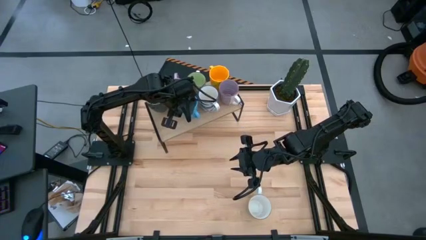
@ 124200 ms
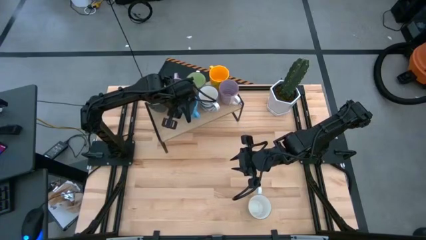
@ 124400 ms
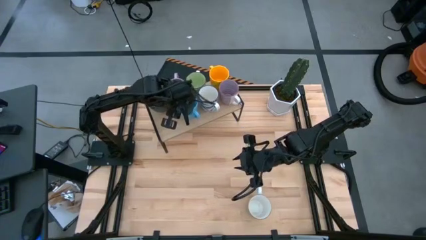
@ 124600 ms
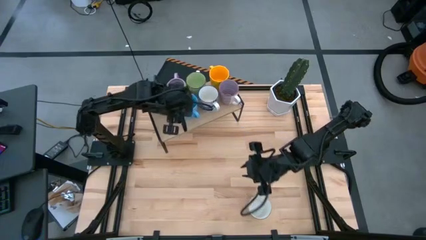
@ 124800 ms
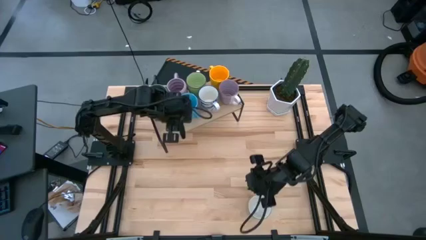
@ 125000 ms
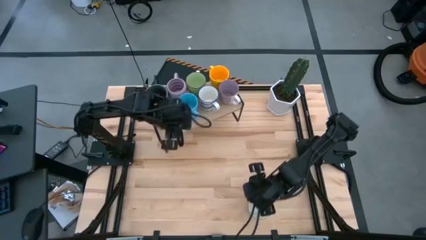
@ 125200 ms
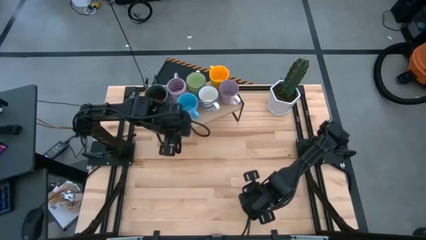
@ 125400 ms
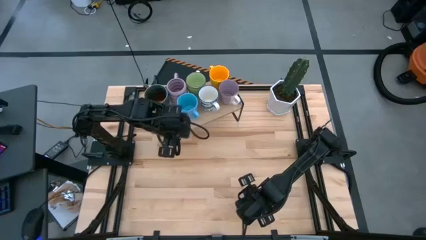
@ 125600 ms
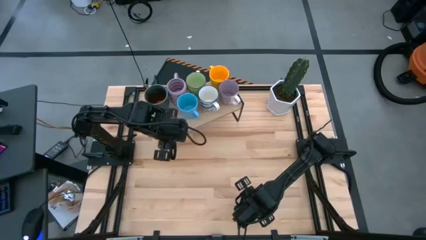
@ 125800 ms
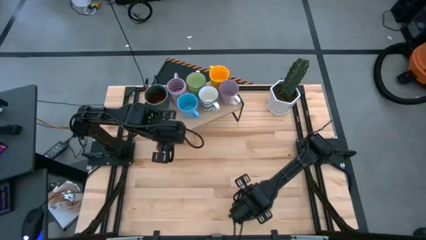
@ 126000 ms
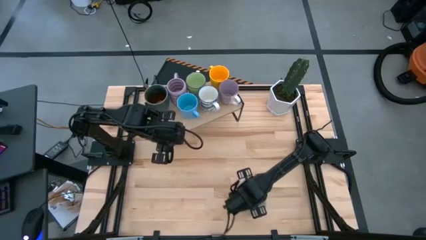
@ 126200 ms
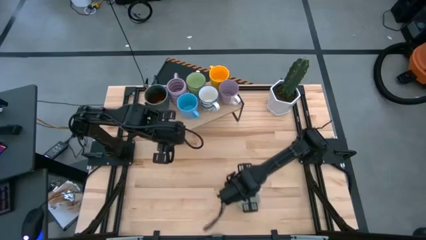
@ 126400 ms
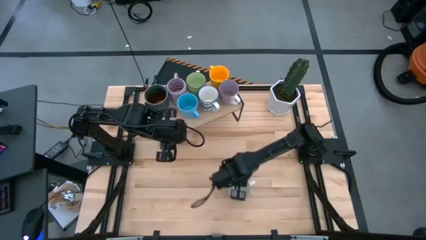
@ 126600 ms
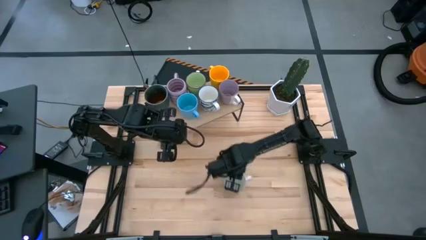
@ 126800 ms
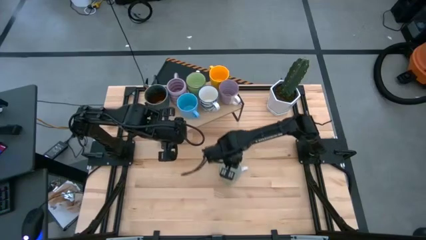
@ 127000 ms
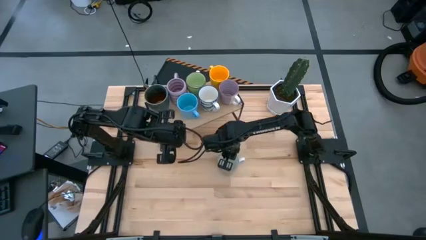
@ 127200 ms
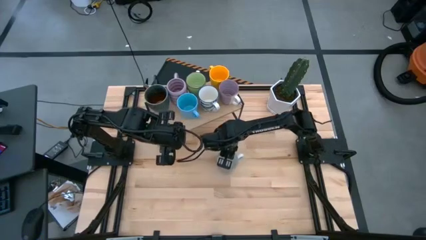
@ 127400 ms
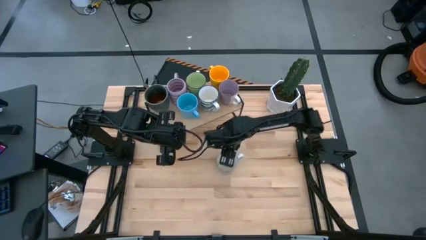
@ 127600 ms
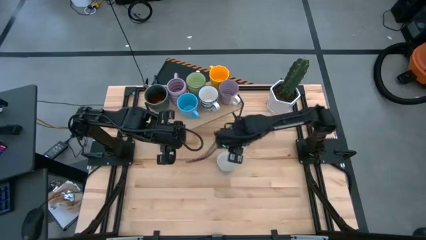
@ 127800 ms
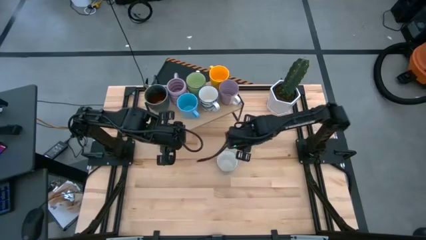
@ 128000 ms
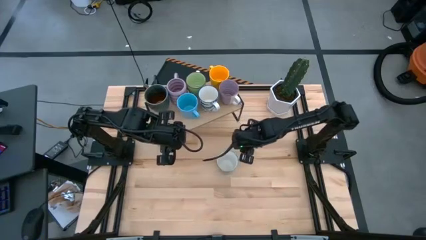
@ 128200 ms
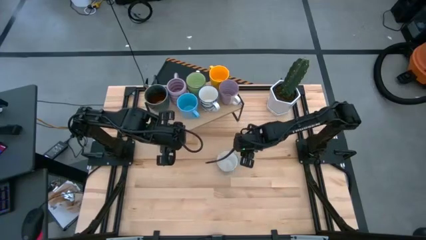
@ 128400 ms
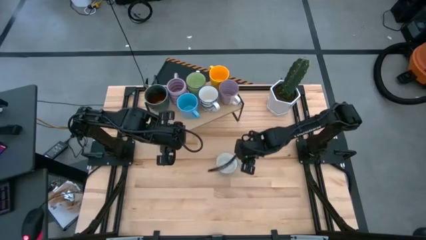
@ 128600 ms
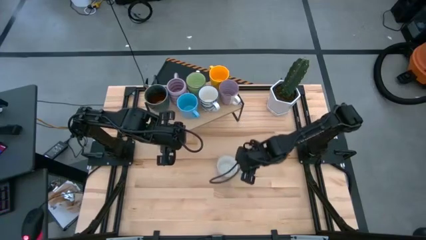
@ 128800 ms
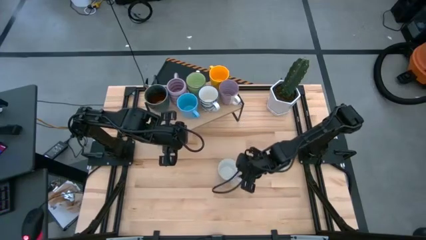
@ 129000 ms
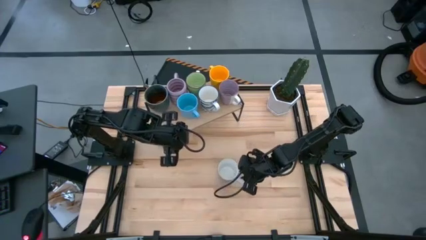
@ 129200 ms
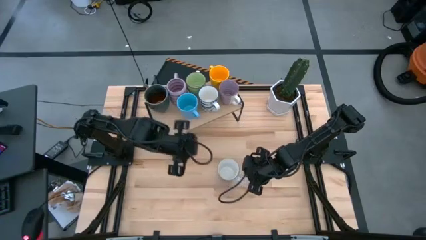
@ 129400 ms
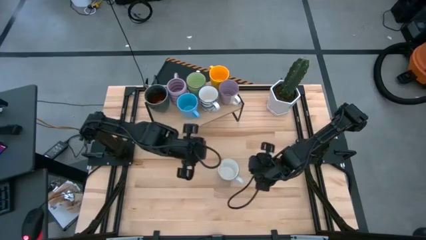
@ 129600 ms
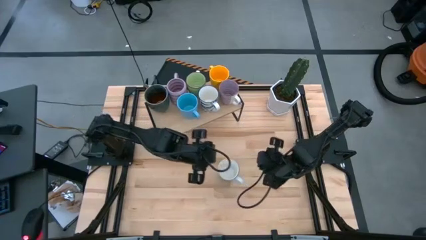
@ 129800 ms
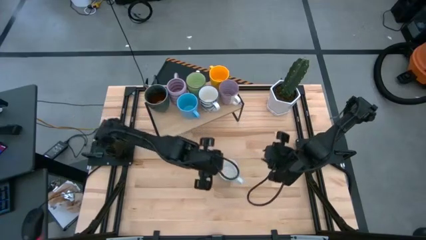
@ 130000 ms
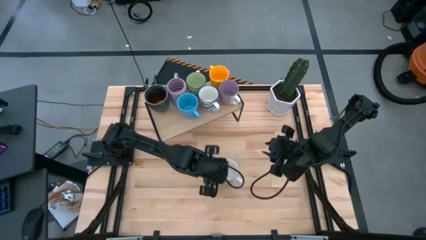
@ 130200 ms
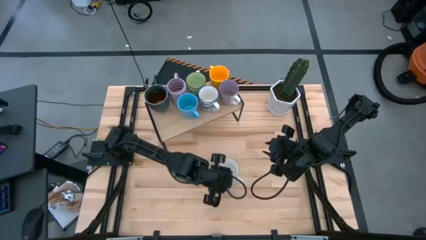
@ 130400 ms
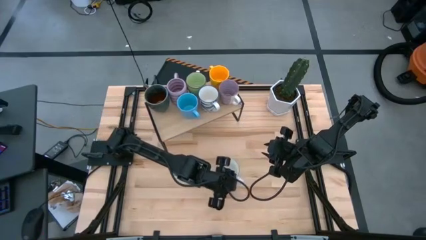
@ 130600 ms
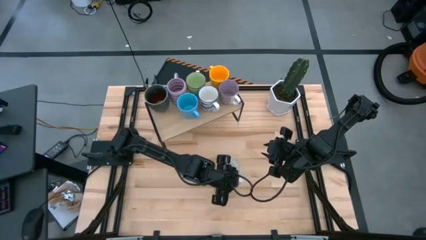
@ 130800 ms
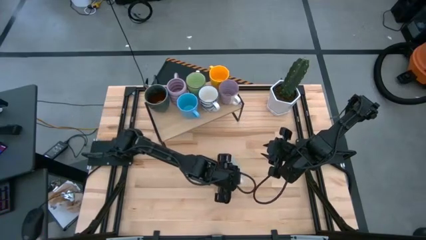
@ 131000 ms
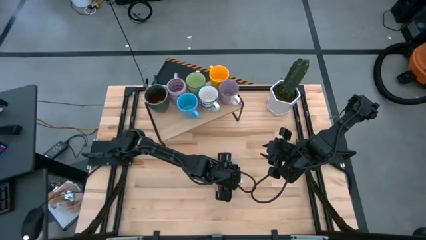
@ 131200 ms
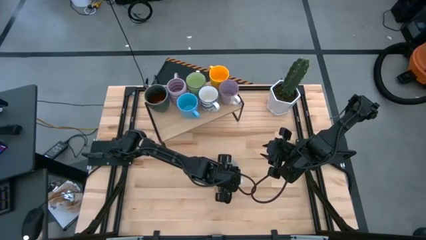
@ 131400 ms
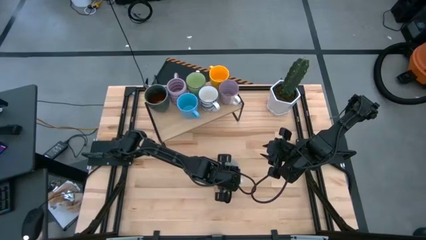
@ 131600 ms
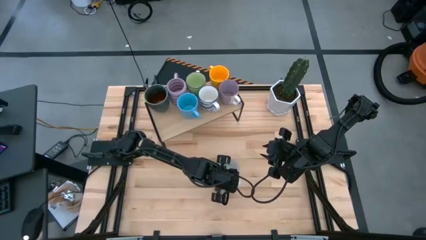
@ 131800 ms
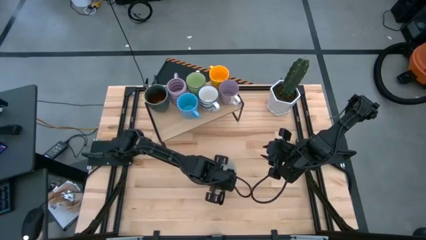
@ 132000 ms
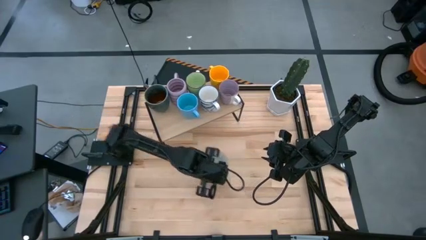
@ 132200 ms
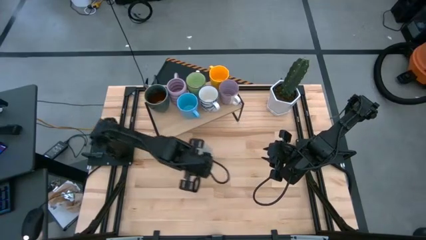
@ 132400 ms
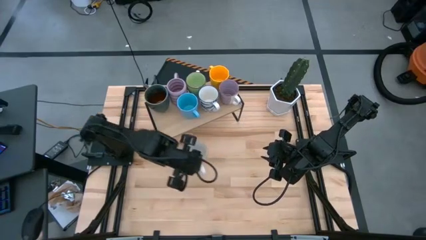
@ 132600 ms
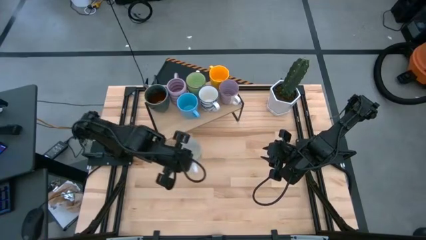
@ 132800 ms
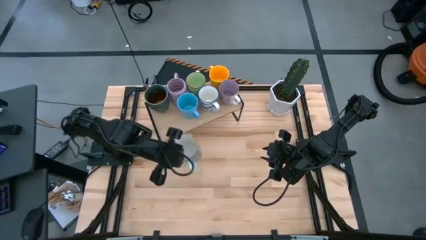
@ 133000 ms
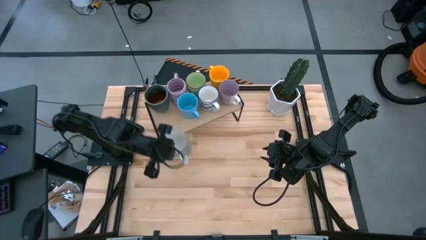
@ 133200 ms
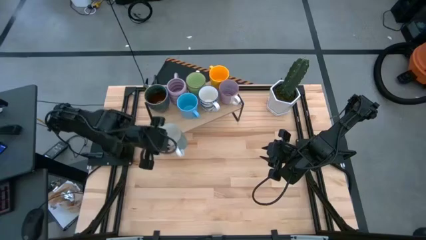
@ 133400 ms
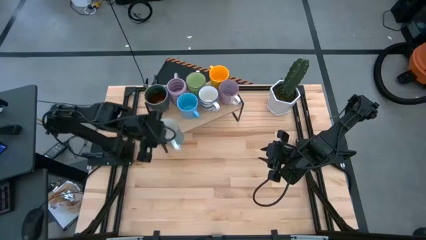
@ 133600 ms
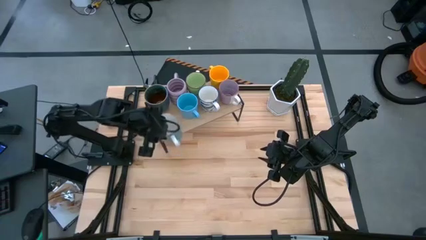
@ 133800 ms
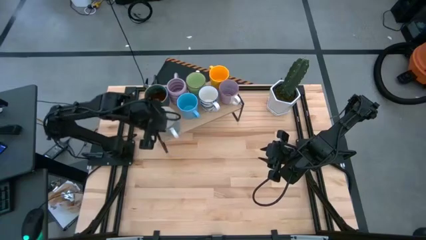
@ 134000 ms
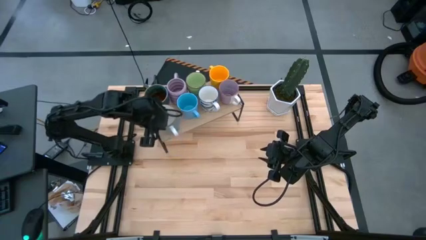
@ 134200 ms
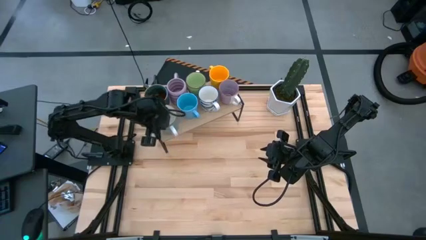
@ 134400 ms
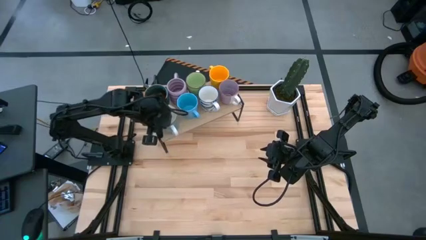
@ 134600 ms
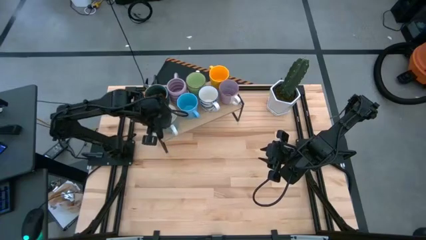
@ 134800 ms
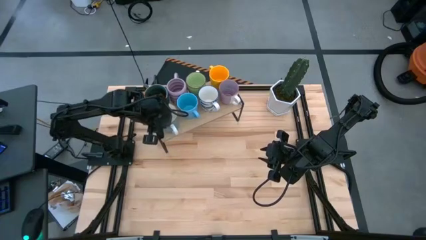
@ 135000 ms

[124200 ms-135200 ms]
Task: Place coffee mugs
Put the light blue mug on the shelf

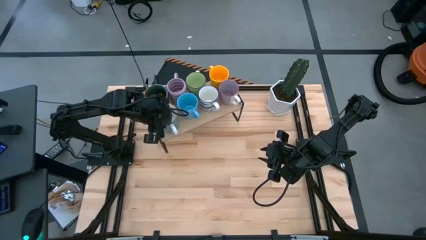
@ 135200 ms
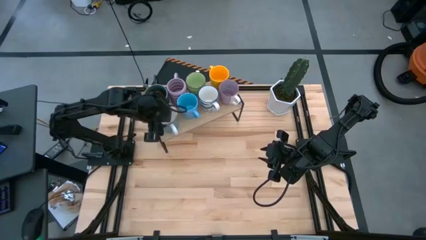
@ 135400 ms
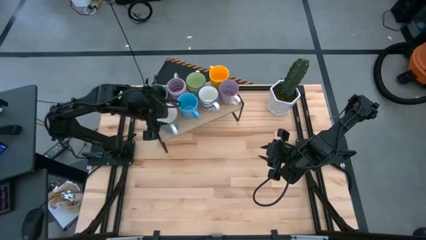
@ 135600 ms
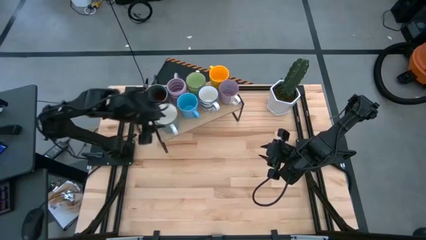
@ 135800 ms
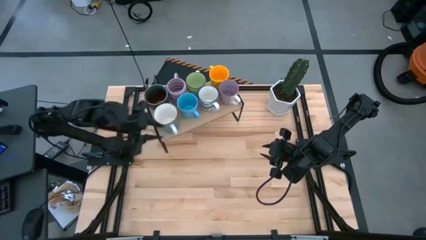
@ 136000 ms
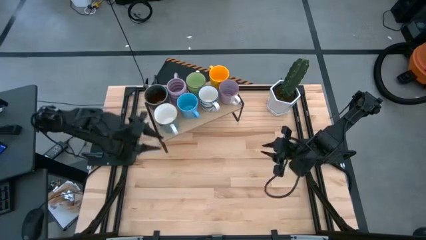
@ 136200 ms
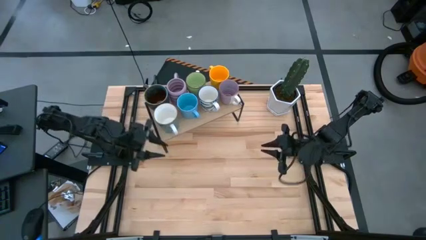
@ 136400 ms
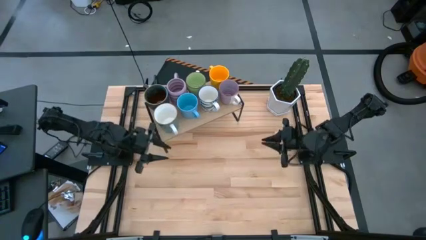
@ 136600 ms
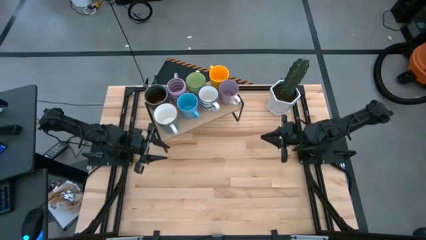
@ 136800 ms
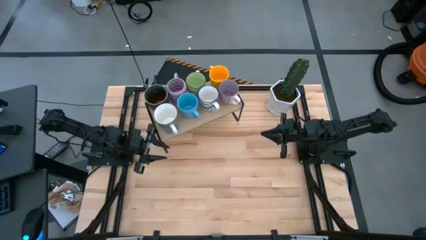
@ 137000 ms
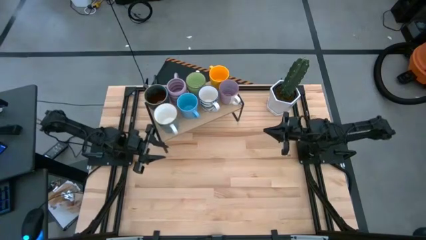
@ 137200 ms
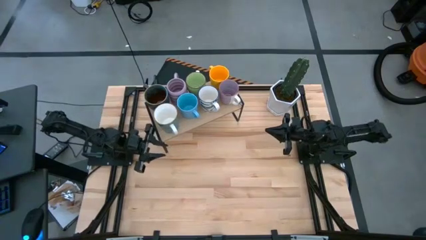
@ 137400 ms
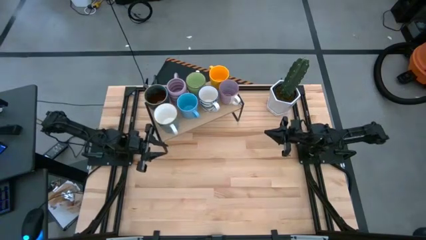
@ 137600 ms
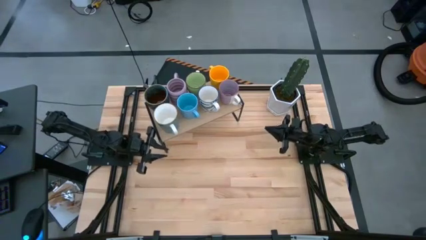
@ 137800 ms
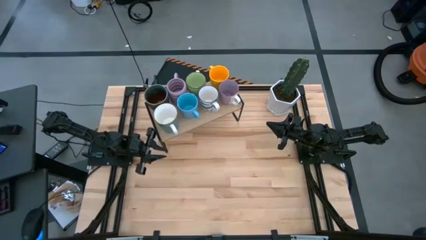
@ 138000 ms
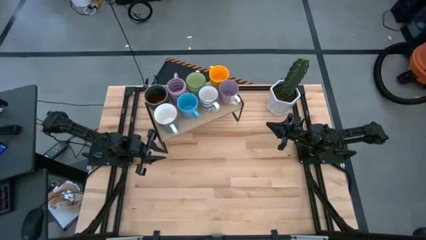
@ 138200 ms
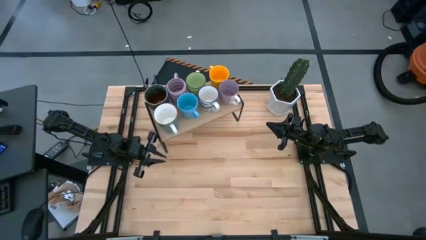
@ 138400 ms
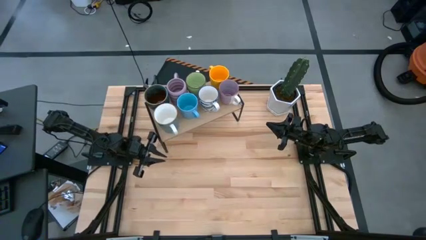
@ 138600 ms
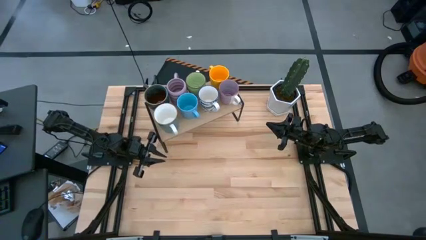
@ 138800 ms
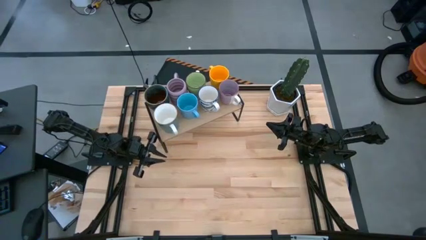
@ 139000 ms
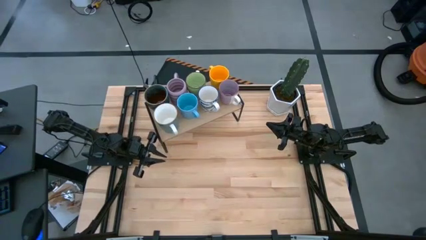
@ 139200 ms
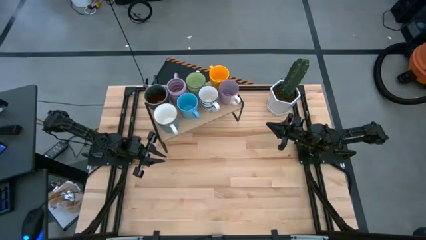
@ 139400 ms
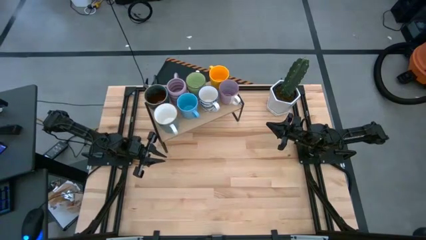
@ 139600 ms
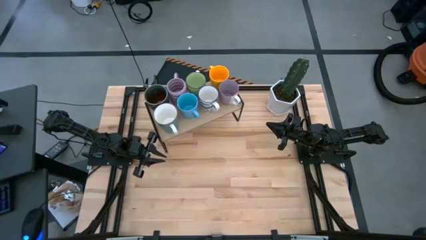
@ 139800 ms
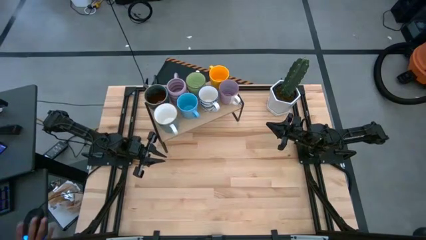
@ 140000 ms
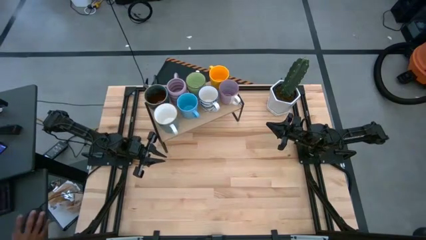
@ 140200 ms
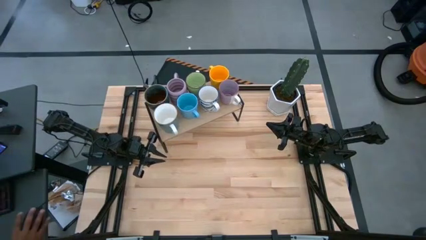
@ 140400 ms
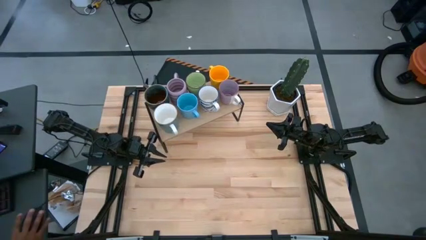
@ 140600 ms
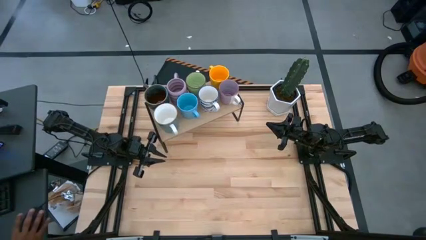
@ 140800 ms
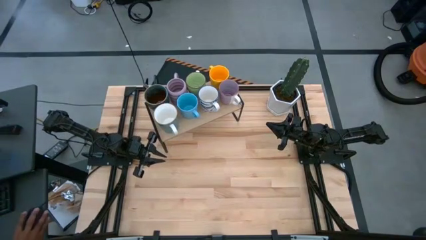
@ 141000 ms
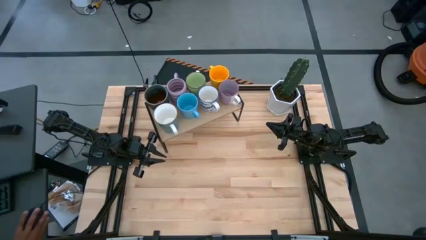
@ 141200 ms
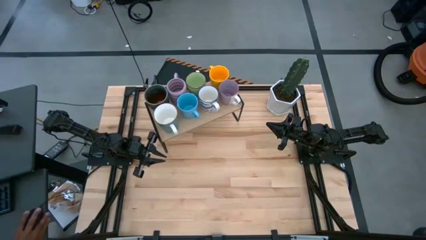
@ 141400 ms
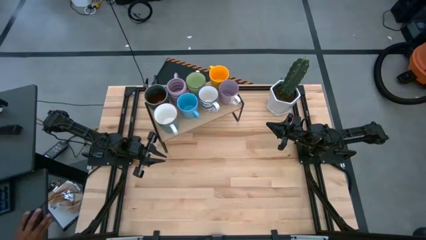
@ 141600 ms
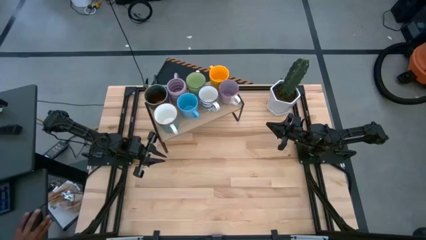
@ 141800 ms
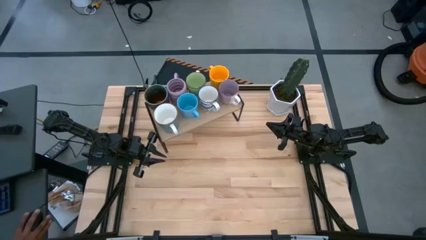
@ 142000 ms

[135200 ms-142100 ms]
Return to Home Position
